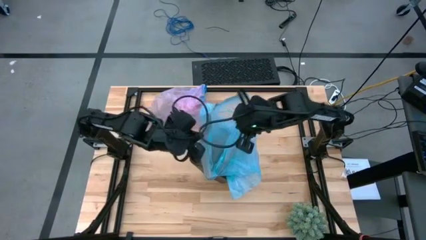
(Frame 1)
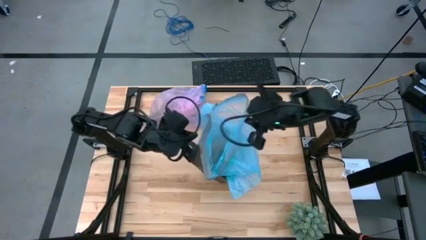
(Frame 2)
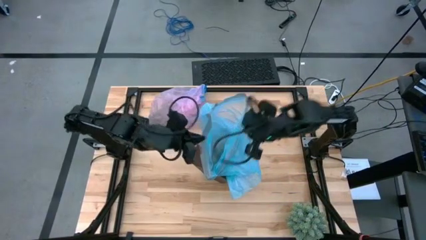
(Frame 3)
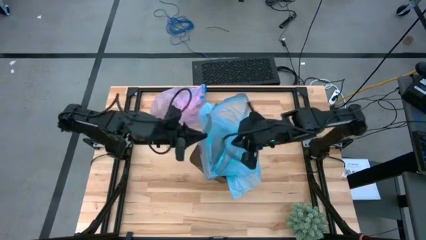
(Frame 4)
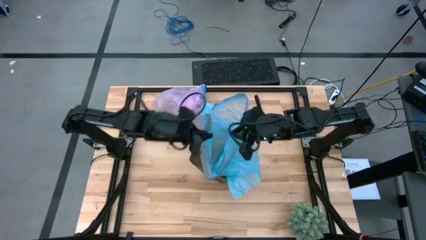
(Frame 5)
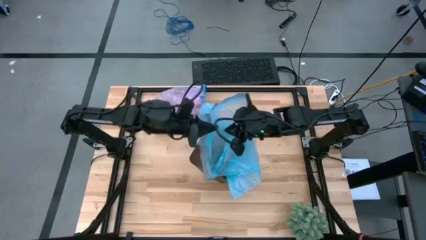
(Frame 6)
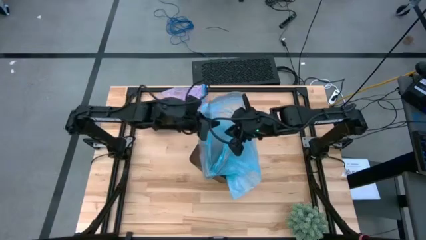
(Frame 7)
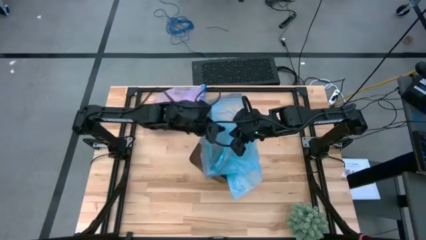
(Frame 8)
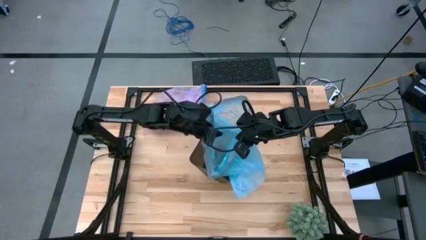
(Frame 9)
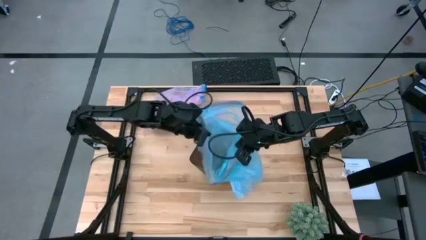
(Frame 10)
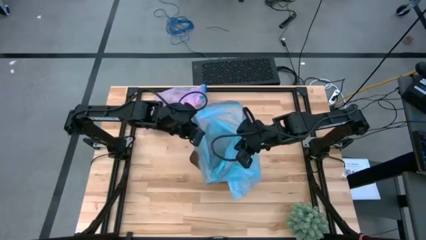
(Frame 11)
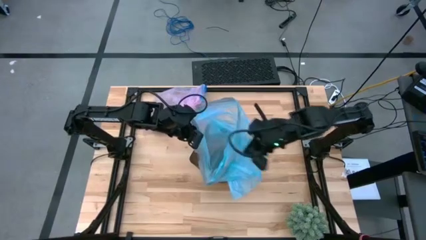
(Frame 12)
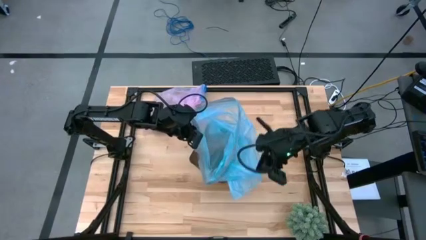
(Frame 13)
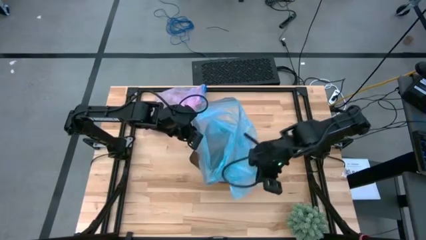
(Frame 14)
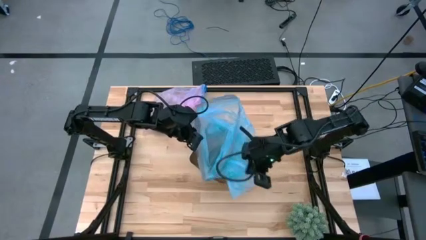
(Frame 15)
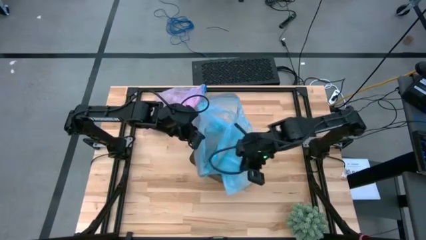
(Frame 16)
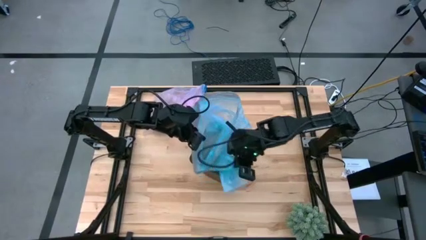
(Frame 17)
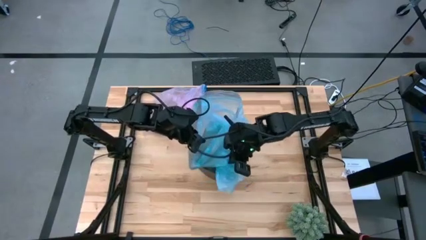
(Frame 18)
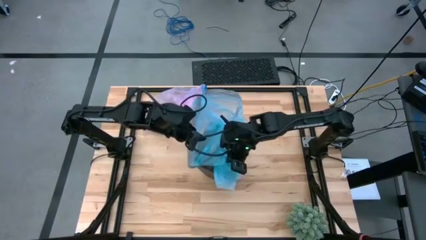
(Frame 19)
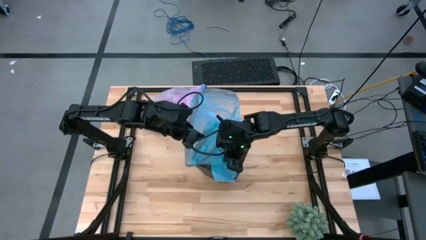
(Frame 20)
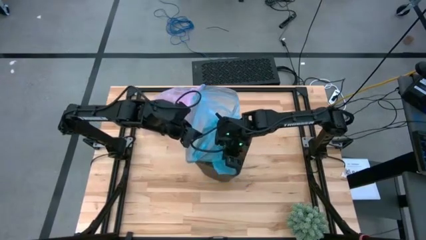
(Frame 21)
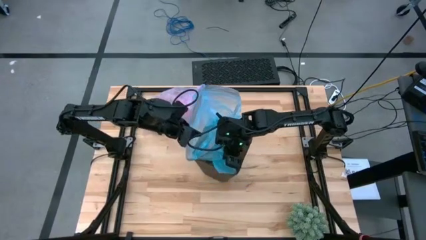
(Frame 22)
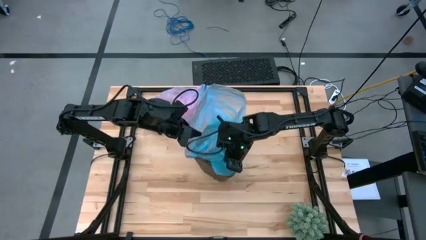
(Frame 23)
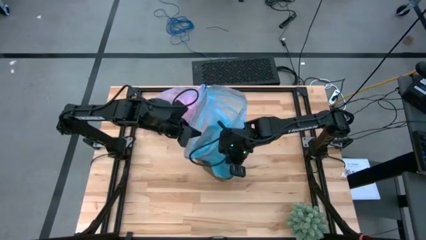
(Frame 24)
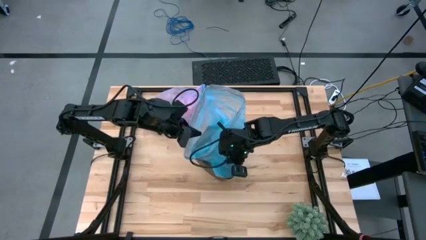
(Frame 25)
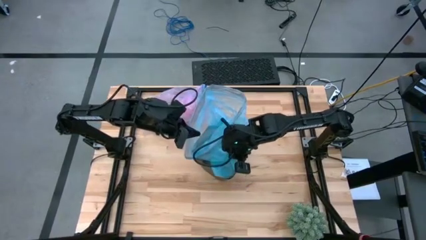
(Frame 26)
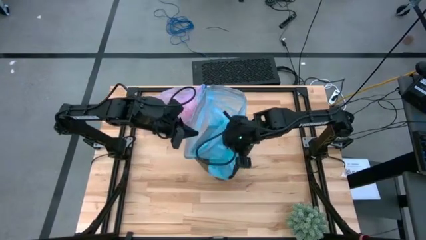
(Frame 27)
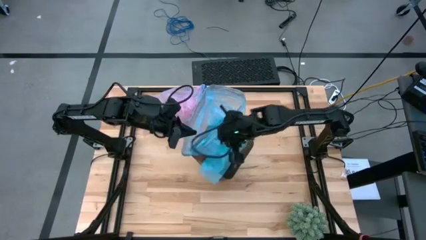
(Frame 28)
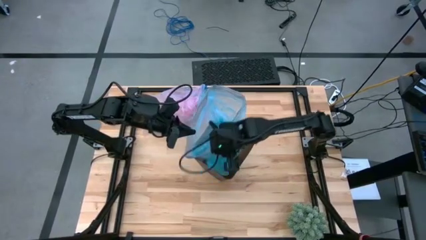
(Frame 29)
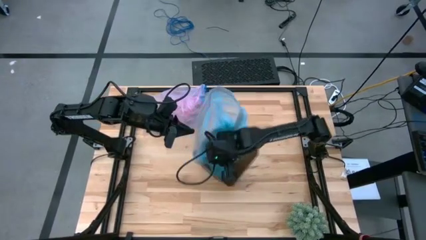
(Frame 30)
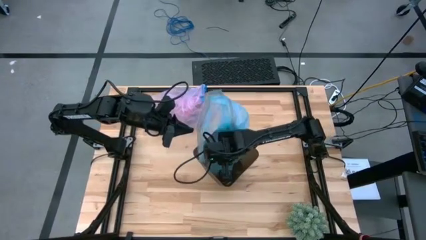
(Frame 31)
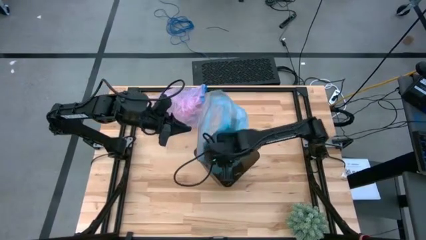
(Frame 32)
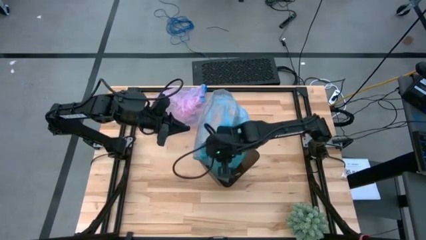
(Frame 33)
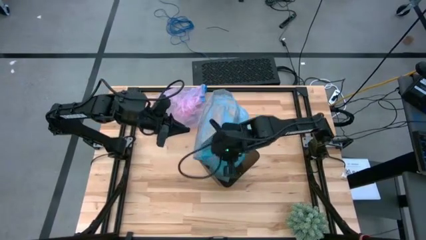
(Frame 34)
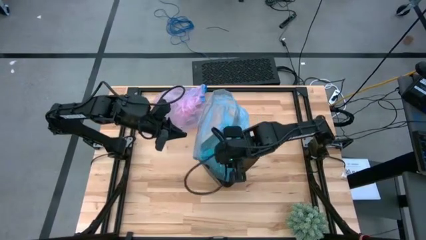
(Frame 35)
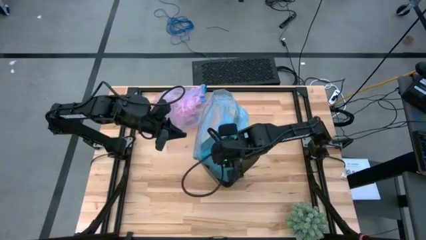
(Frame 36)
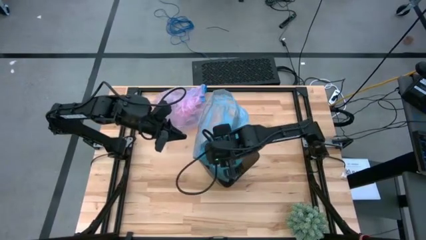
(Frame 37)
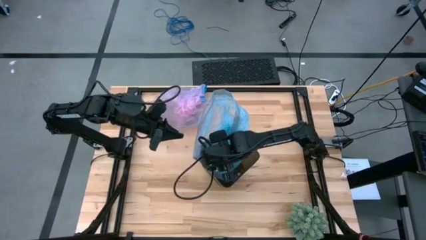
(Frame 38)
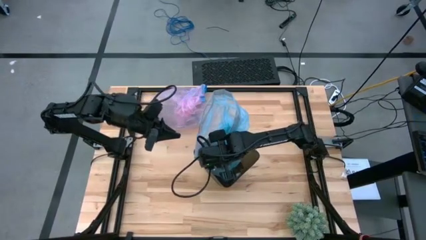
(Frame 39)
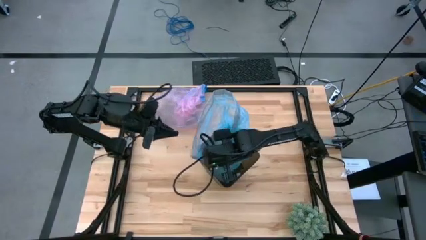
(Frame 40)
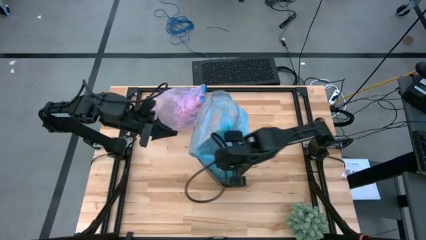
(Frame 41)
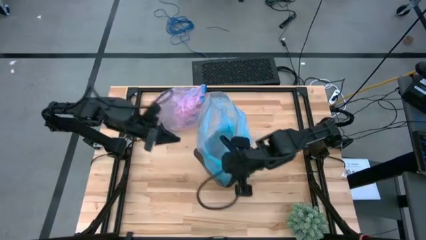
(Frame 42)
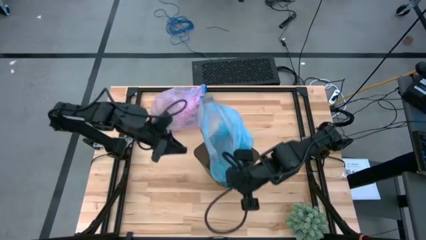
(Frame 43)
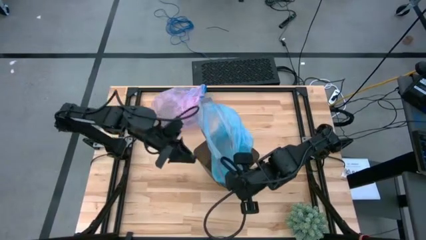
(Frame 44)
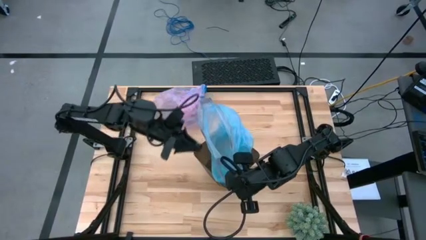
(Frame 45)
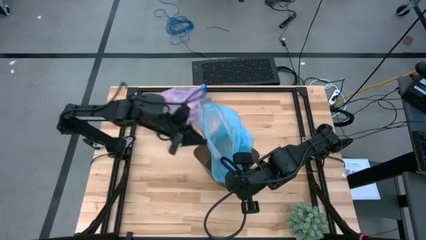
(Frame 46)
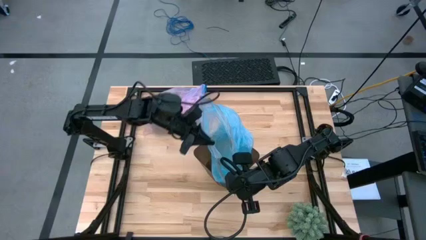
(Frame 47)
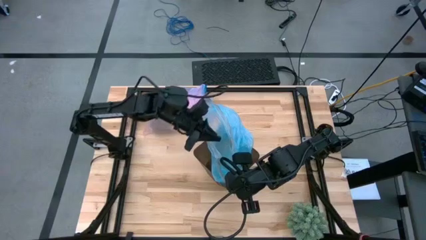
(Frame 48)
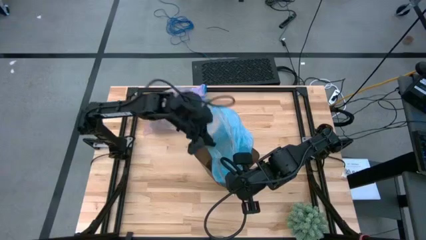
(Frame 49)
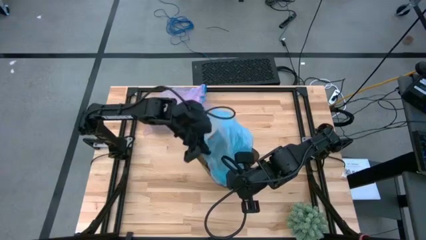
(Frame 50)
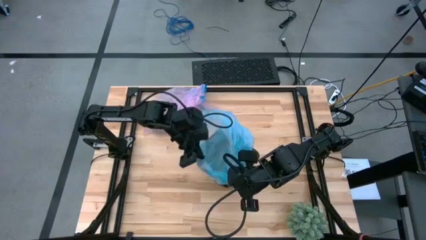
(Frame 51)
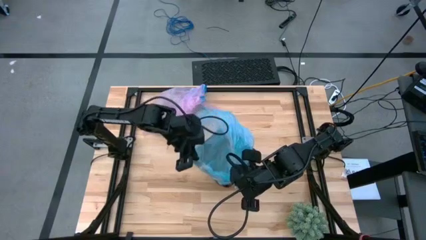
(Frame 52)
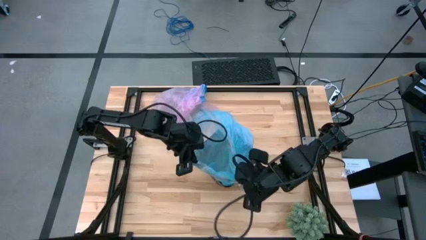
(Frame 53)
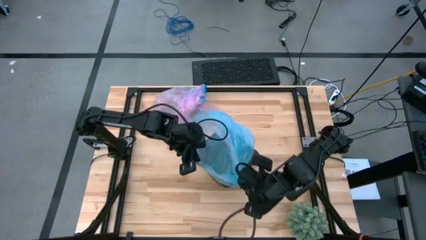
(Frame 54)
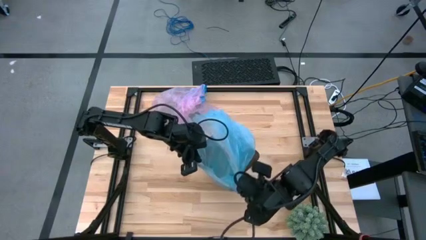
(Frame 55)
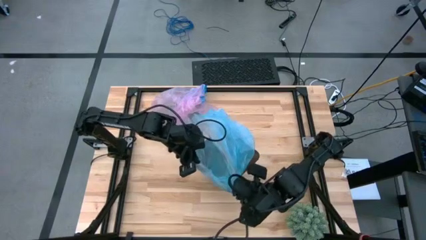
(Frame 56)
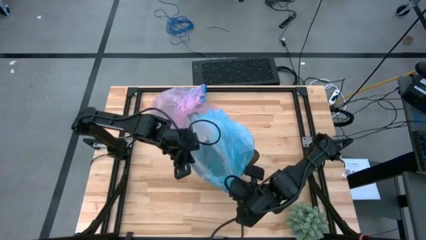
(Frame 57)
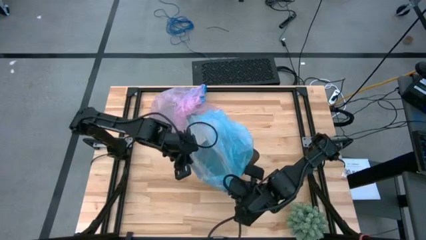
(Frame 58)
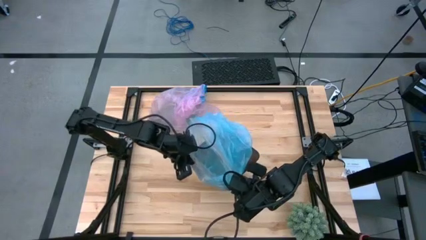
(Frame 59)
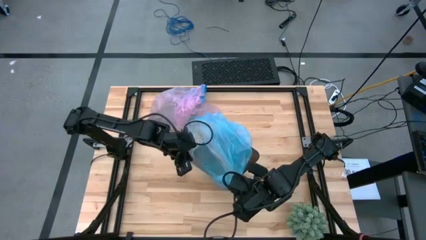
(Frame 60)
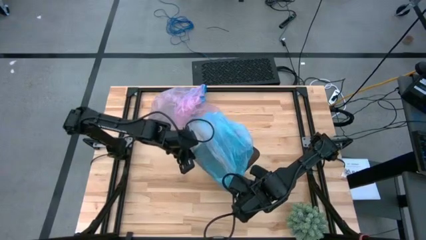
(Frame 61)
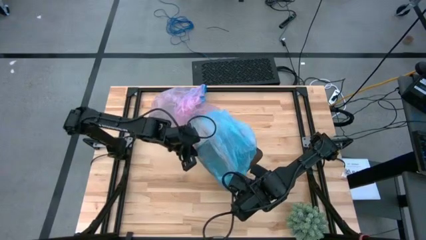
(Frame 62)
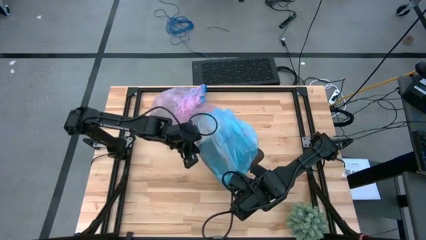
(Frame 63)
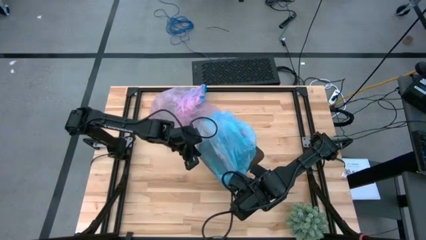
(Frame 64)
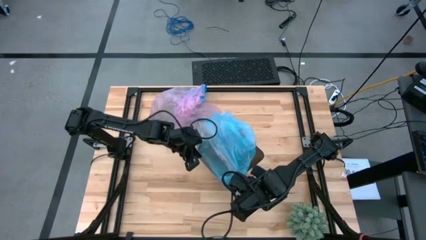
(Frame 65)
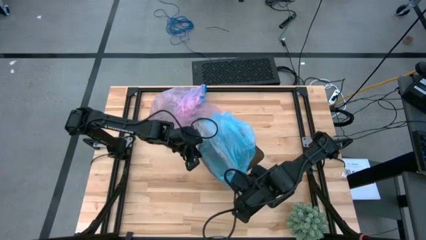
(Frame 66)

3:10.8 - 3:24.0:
Task: place trash/remove bag and relplace
Insert the new trash bag into the trash bin

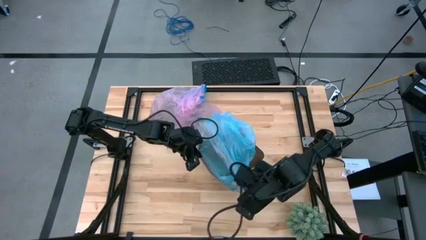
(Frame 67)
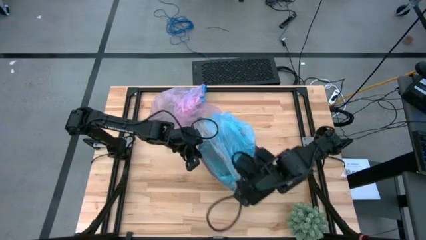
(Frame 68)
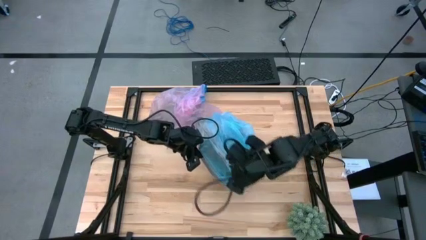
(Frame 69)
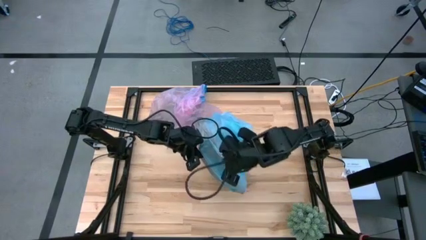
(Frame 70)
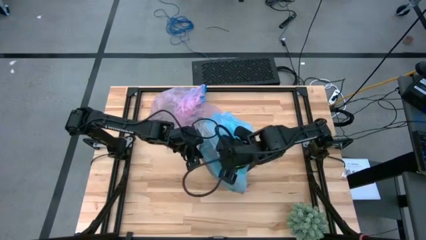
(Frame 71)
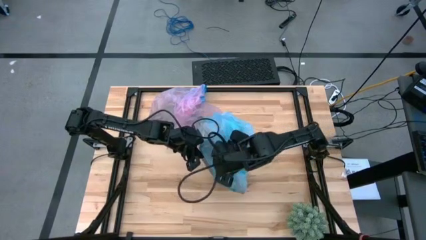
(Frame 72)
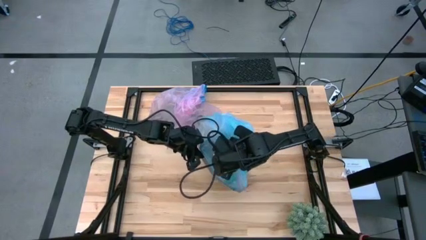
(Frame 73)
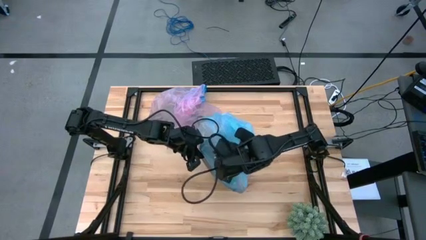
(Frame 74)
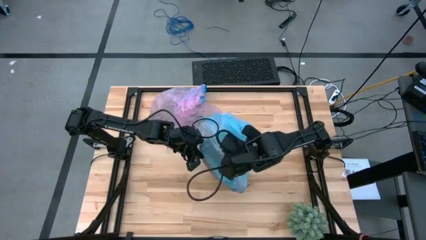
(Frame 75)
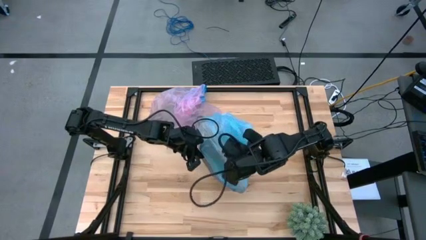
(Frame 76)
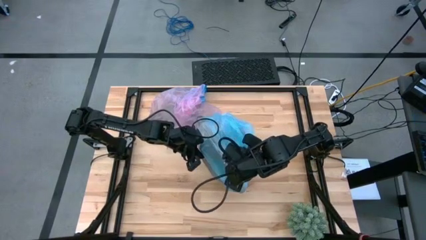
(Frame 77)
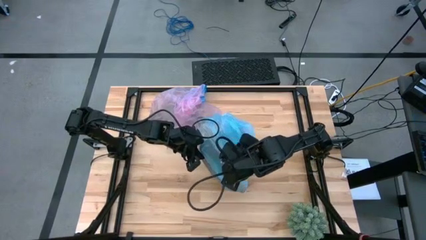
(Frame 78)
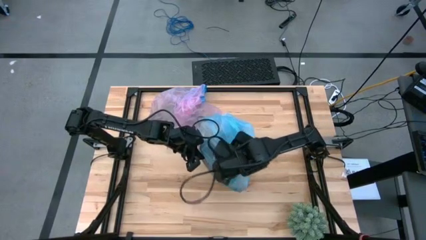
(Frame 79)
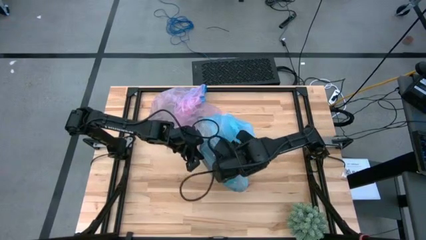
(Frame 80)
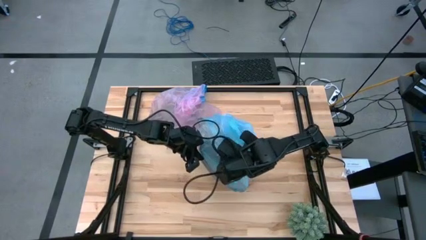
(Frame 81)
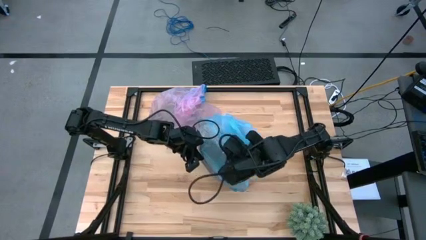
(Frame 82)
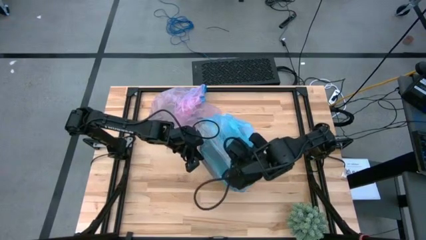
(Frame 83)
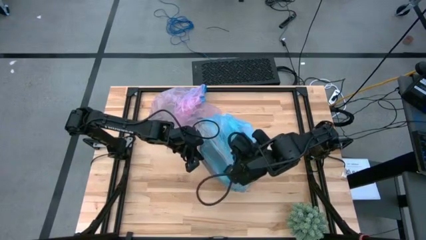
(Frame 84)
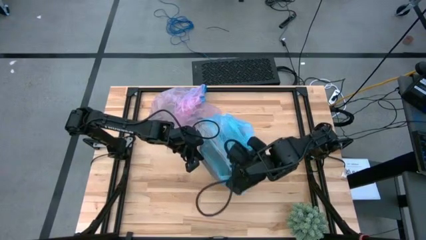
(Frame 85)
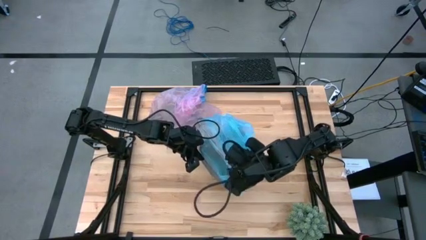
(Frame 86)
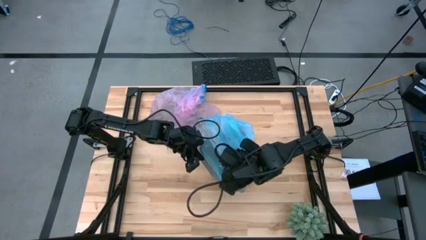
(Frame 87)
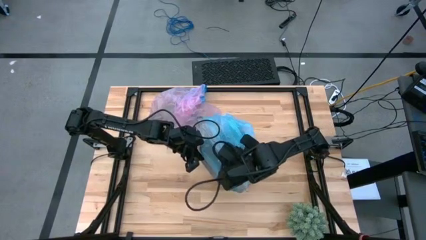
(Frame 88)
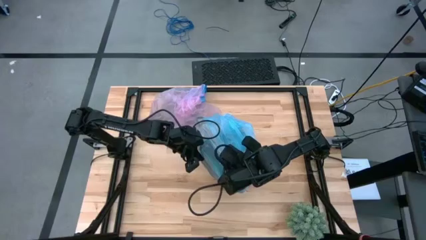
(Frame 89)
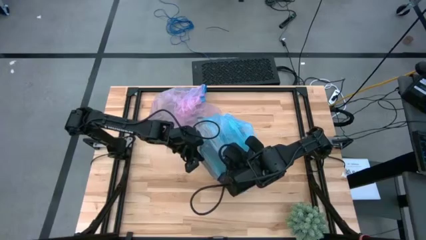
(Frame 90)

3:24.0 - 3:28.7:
Insert the new trash bag into the trash bin
